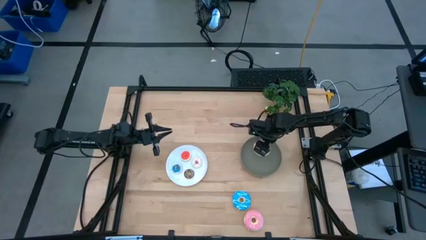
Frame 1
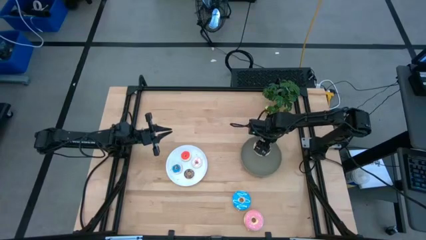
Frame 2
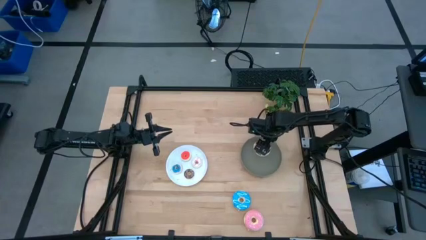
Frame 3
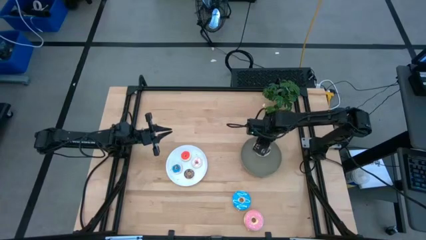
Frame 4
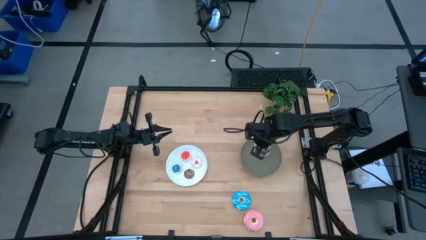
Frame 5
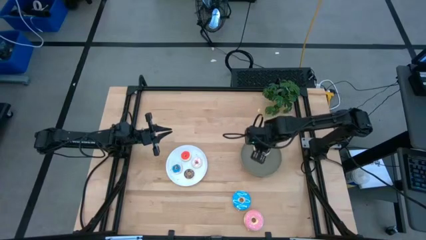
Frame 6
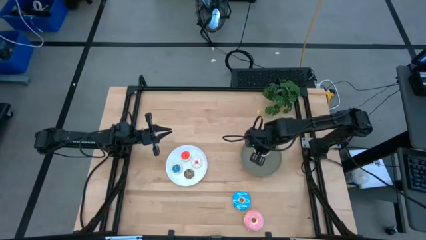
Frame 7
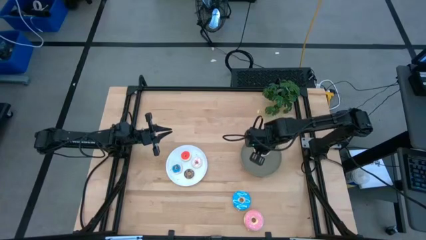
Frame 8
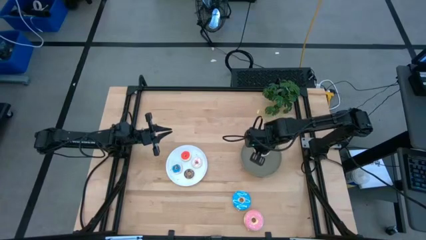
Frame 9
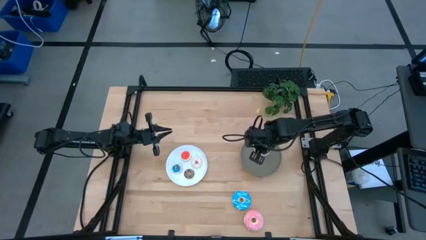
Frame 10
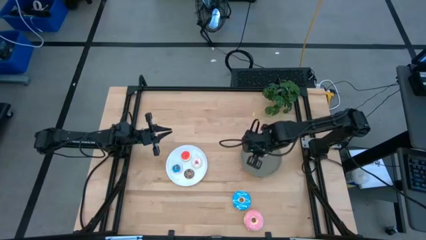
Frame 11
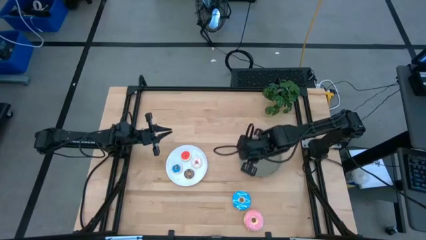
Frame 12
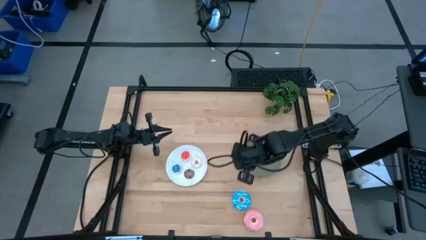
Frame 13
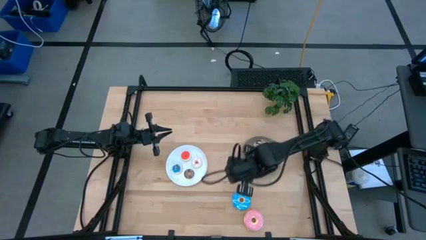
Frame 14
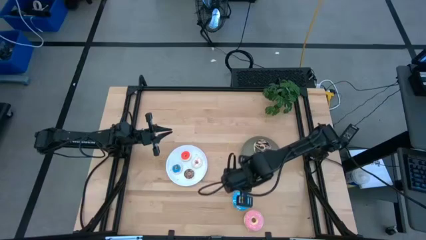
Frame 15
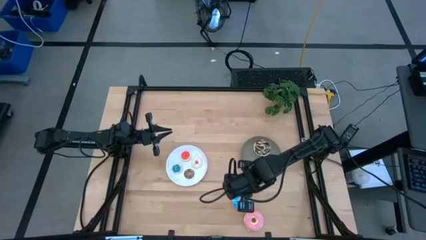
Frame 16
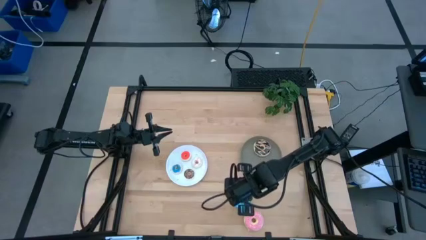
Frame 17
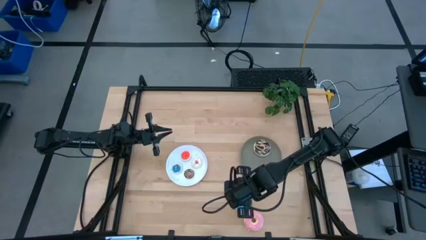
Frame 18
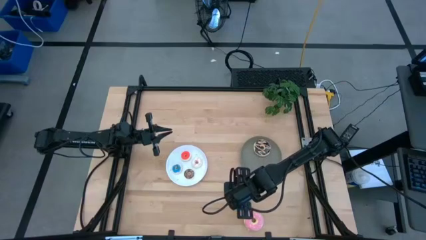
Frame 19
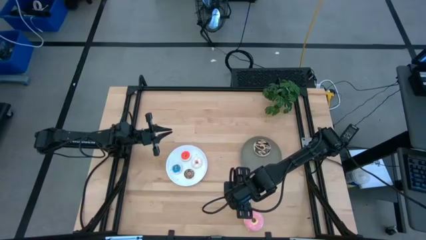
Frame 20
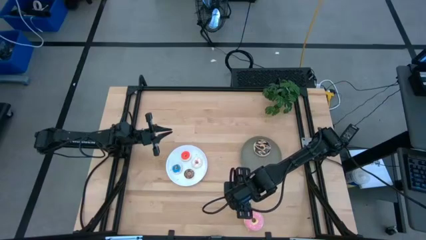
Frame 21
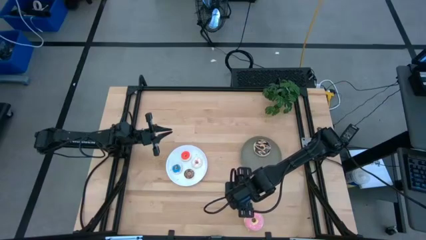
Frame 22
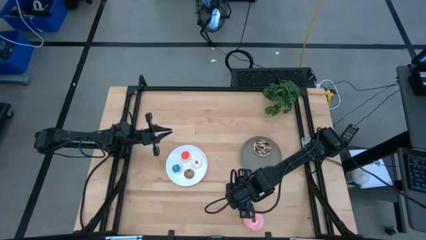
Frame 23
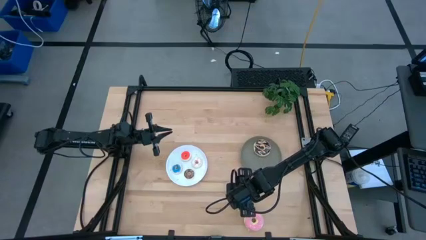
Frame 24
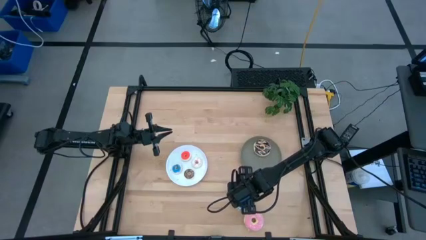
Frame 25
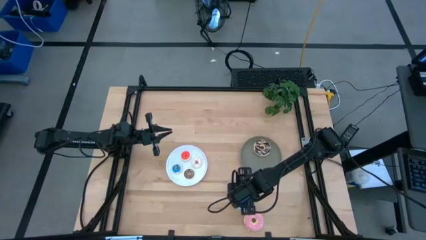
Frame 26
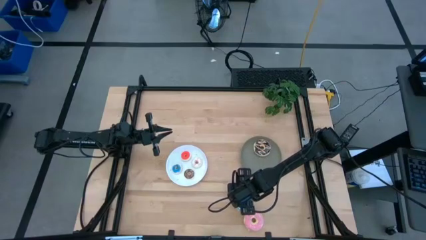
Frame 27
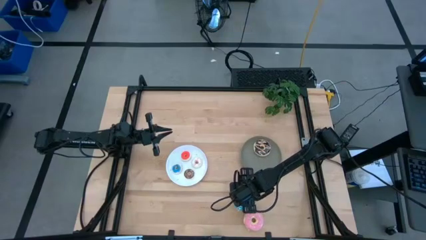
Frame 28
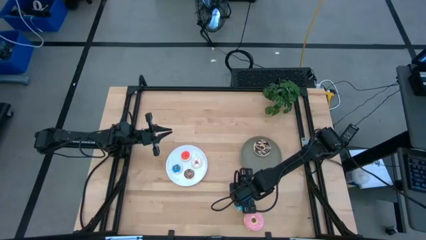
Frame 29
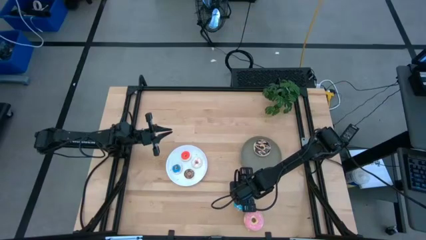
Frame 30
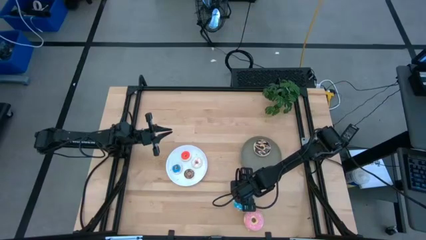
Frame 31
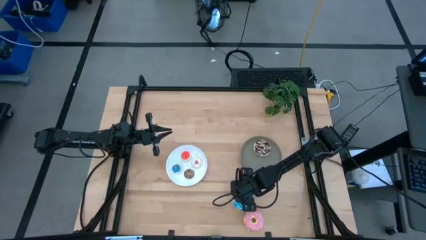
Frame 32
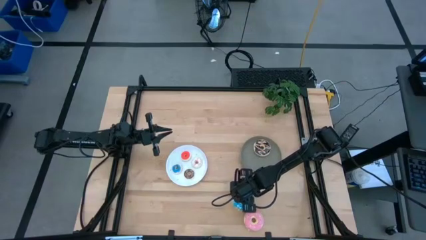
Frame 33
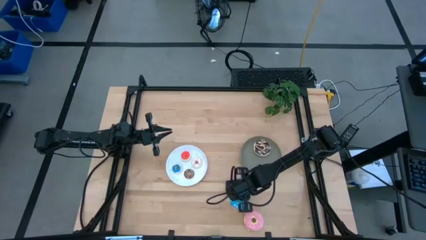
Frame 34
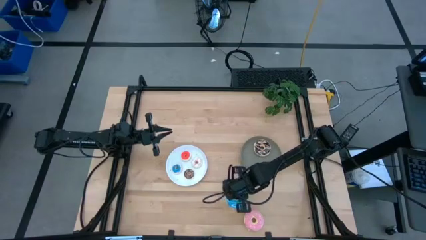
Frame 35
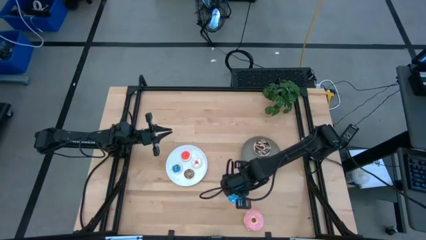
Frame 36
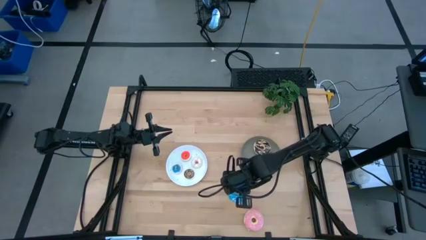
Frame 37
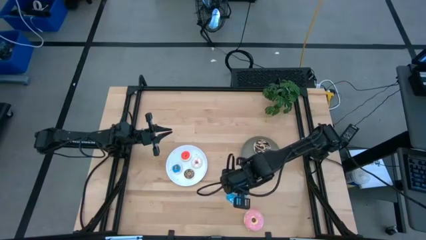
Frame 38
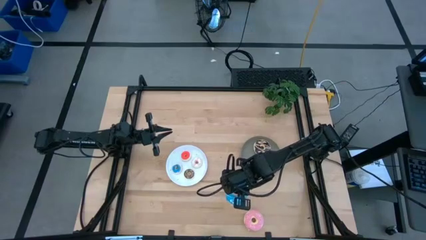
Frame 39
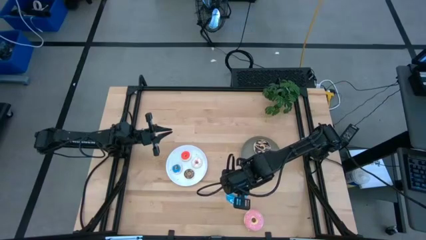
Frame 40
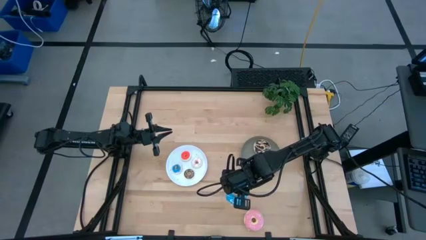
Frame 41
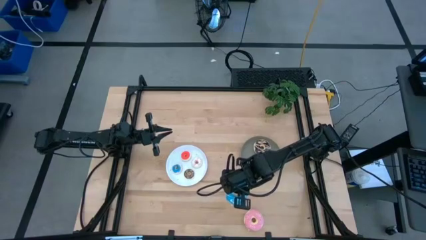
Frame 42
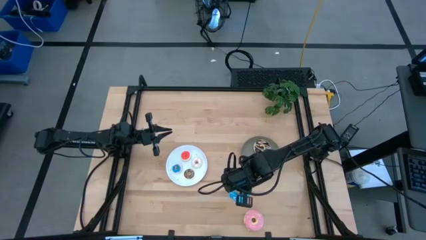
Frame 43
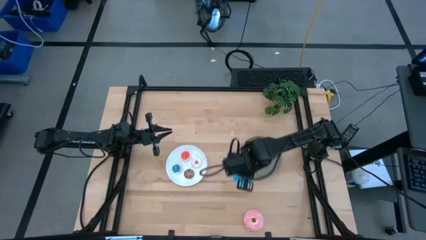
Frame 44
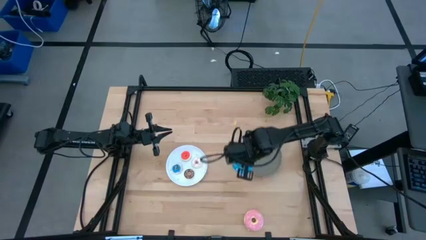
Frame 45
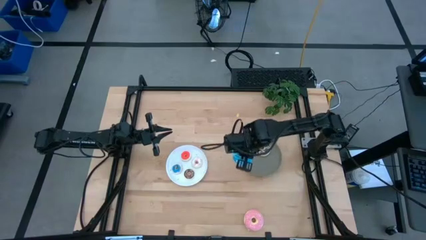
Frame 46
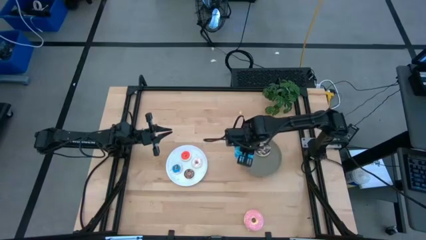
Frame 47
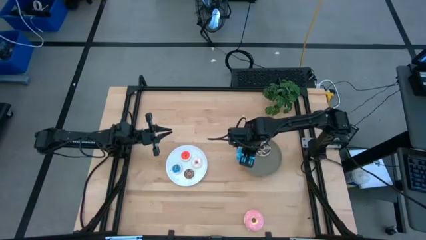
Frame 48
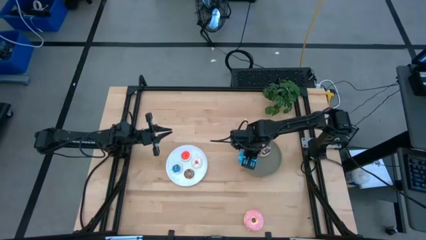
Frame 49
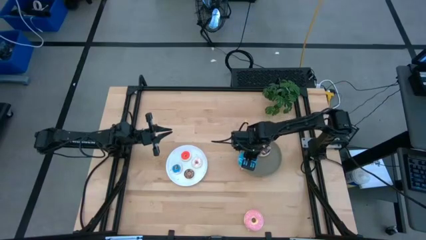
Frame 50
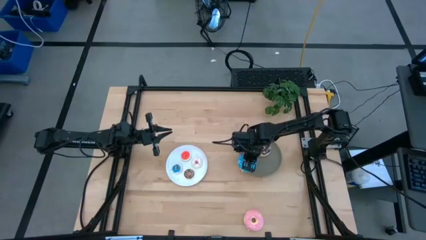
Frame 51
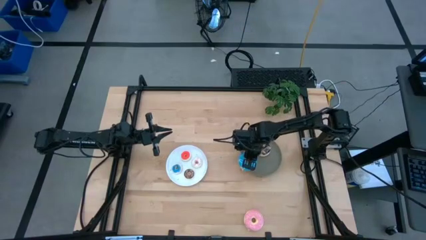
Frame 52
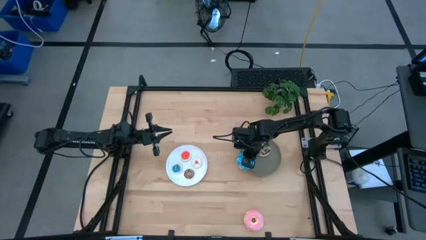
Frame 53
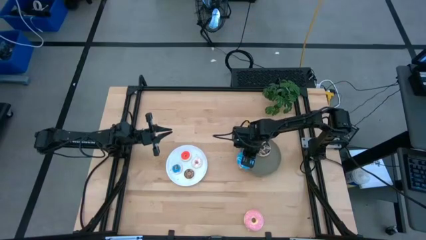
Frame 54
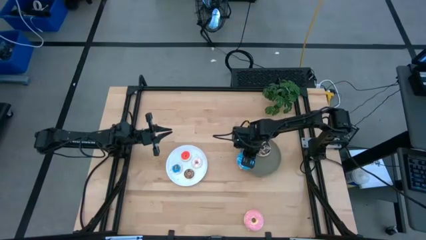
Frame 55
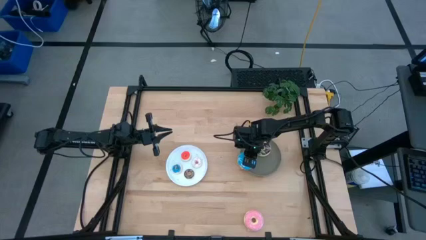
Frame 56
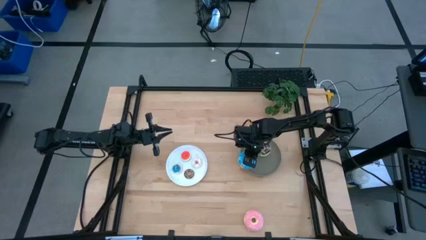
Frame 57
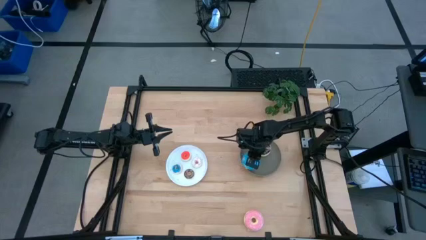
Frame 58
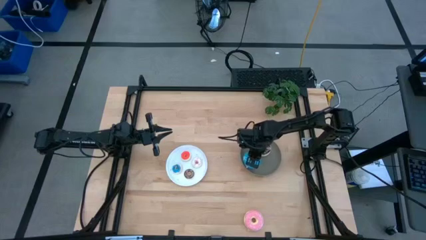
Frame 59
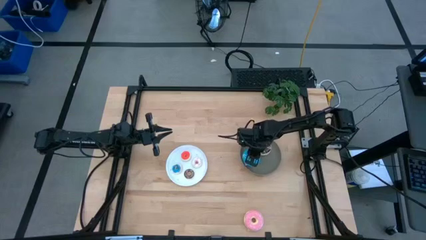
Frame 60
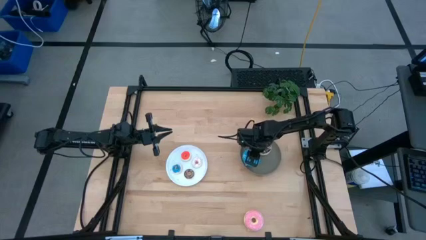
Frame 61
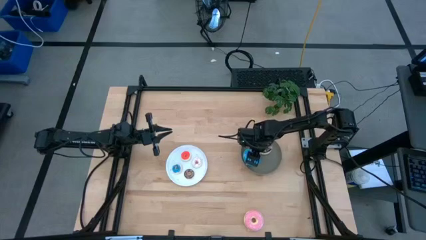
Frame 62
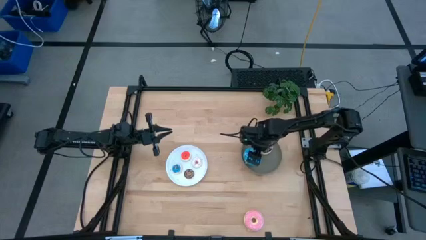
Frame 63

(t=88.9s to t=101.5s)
Task: Pick & Place donuts
Put the large blue donut on the gray plate

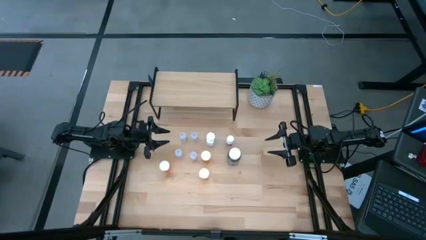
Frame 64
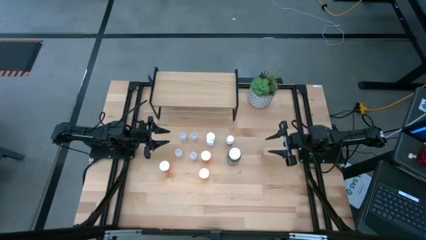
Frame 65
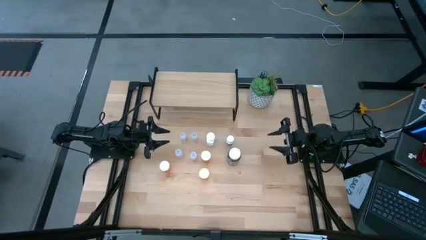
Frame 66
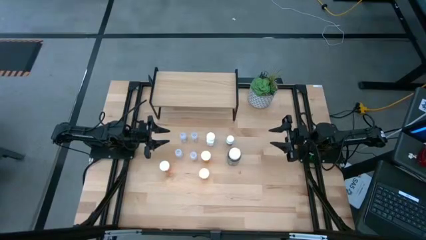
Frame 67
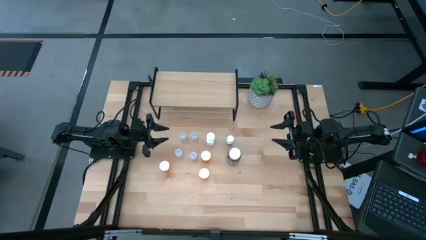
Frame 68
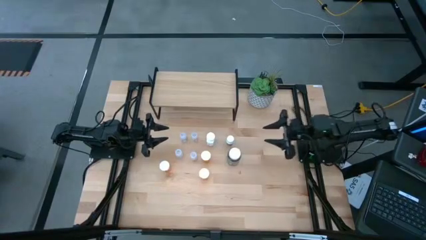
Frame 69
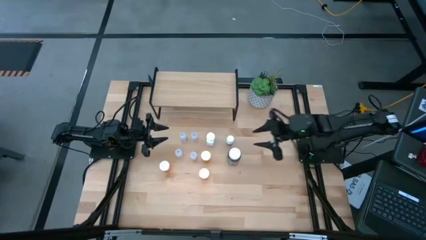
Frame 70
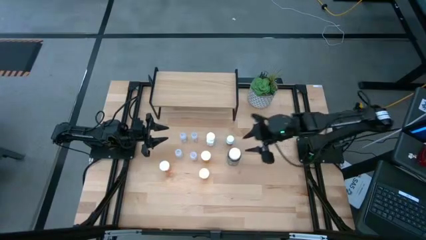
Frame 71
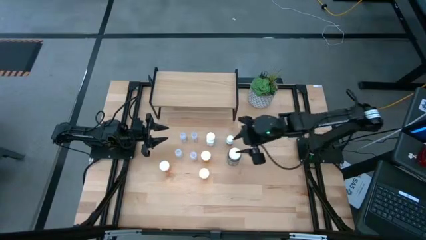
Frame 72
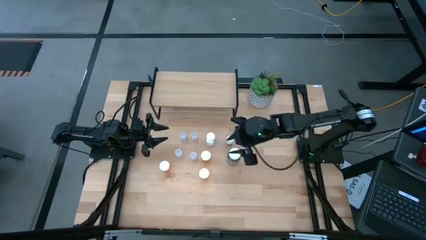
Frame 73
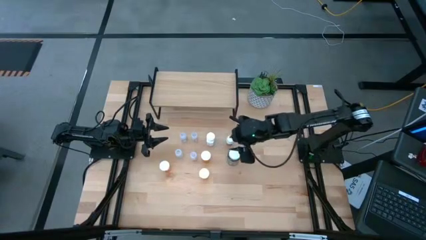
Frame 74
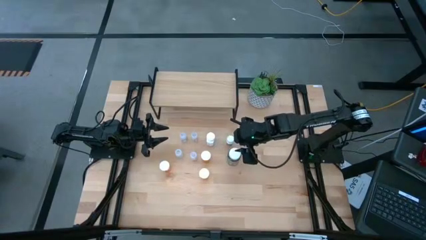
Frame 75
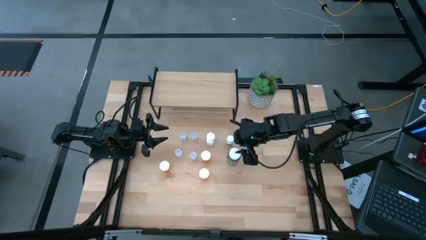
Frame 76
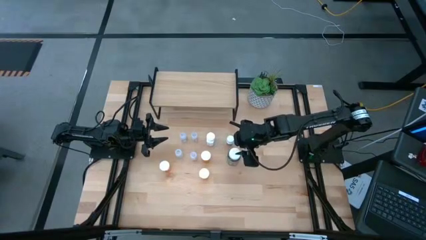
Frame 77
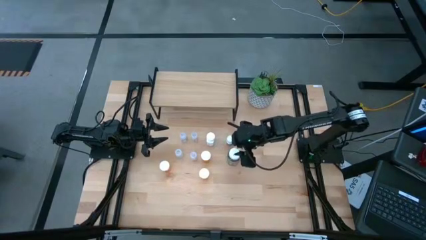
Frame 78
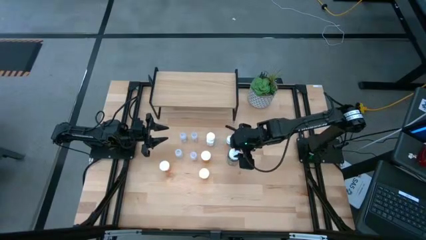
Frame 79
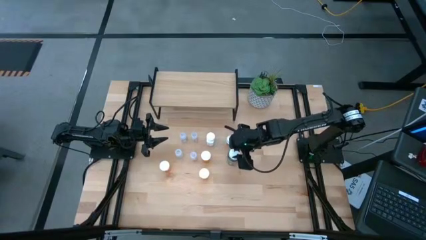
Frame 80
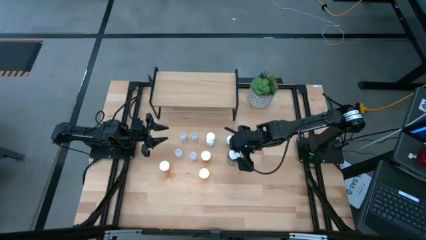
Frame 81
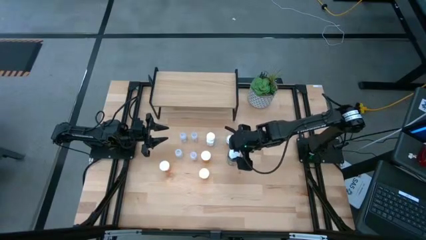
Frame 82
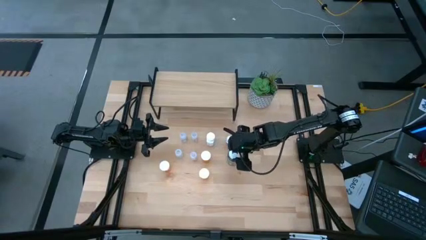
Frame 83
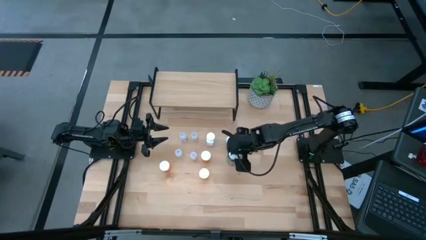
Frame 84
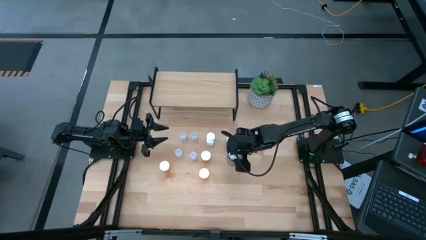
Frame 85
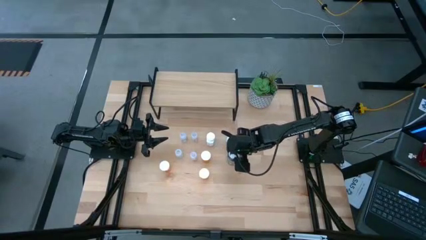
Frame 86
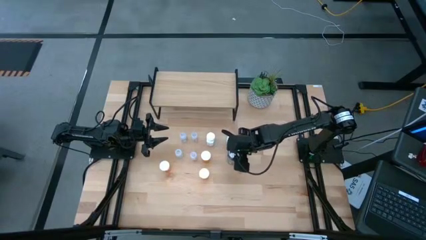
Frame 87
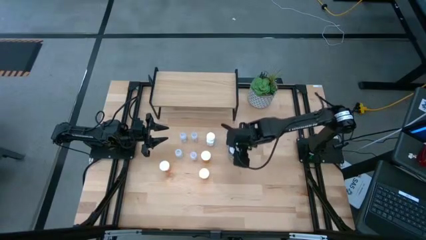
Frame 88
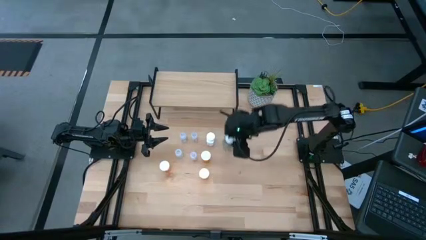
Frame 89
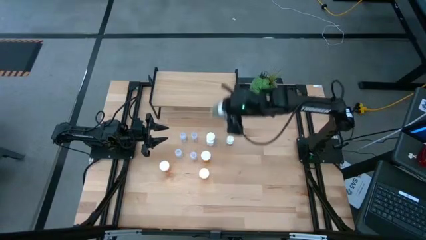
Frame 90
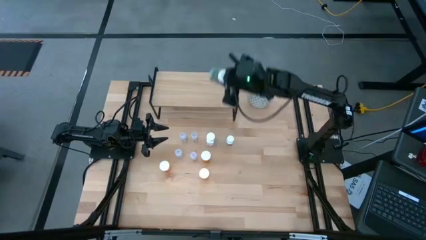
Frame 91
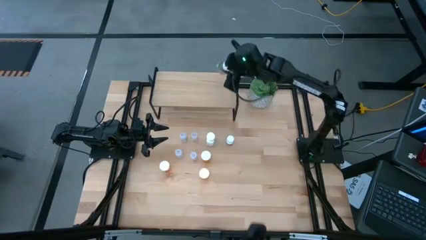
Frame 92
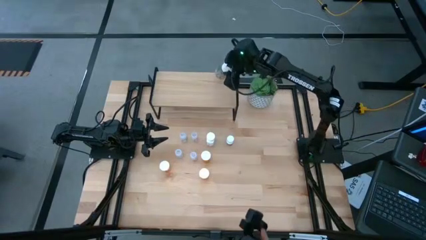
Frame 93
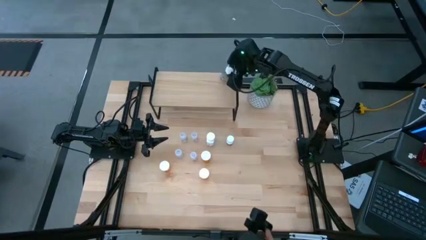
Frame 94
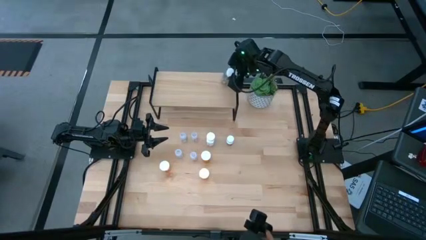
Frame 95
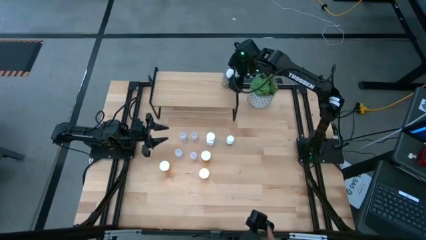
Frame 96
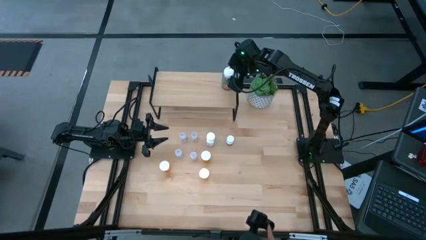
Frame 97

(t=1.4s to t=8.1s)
Task: Pick and place medicine bottles onto shelf by color
Put the green pill bottle on the shelf
